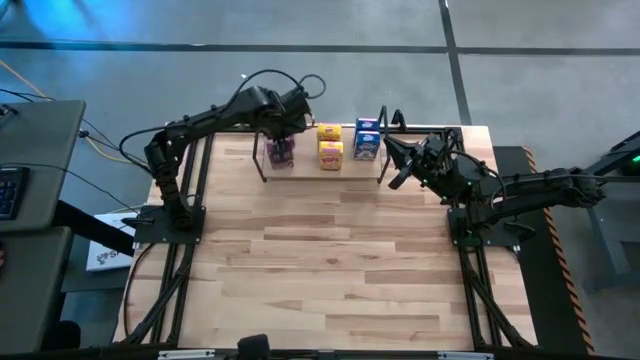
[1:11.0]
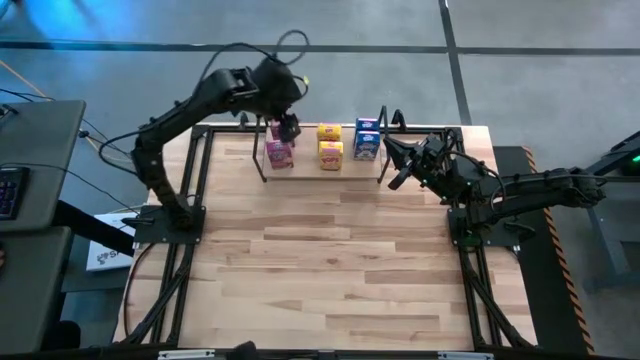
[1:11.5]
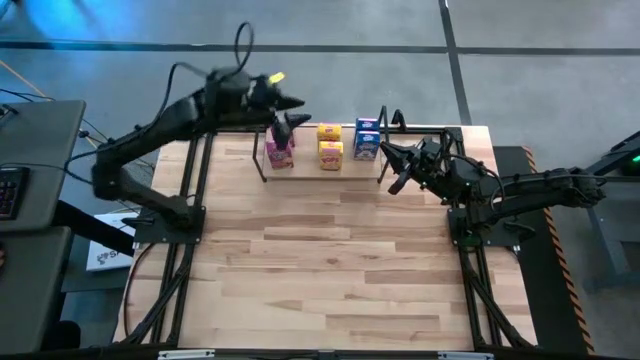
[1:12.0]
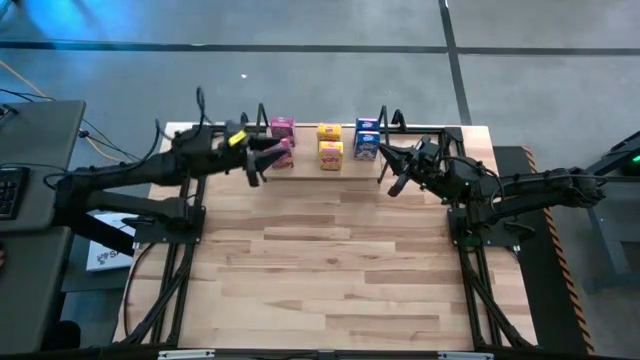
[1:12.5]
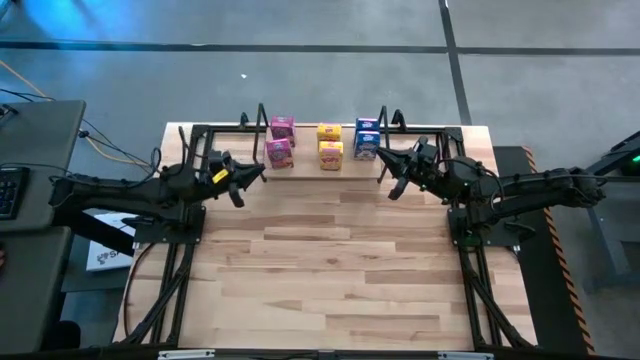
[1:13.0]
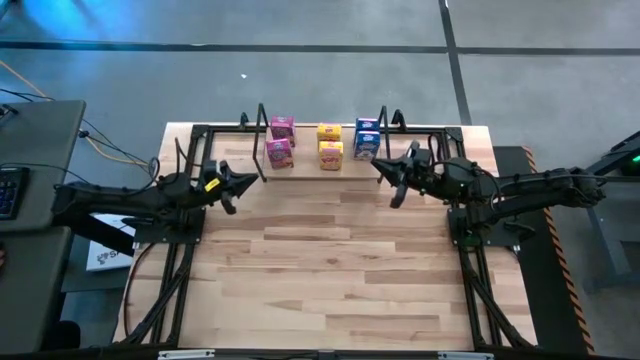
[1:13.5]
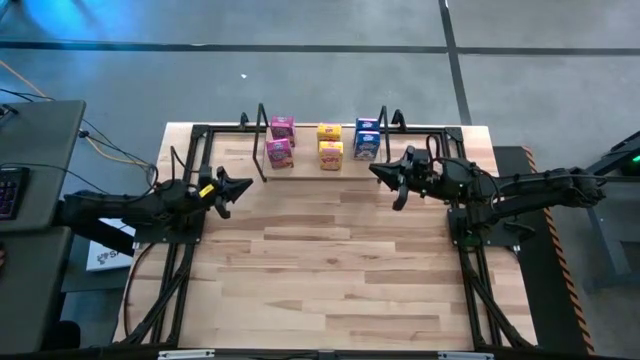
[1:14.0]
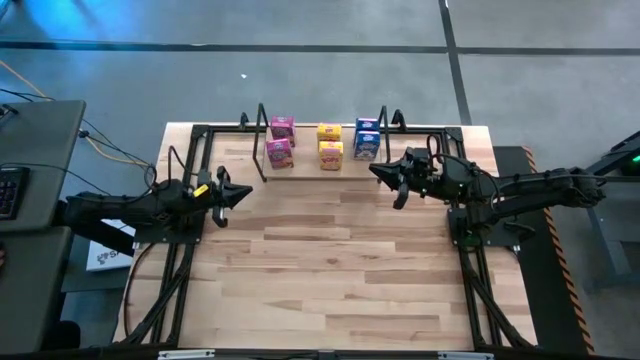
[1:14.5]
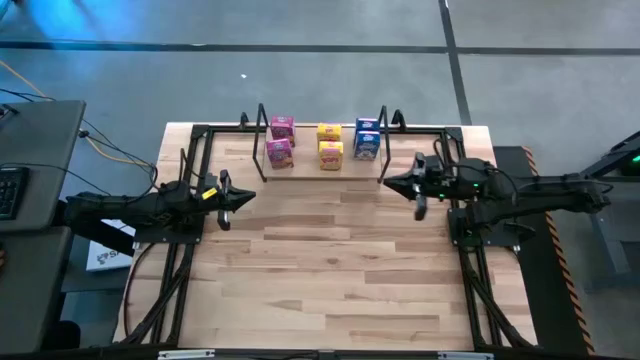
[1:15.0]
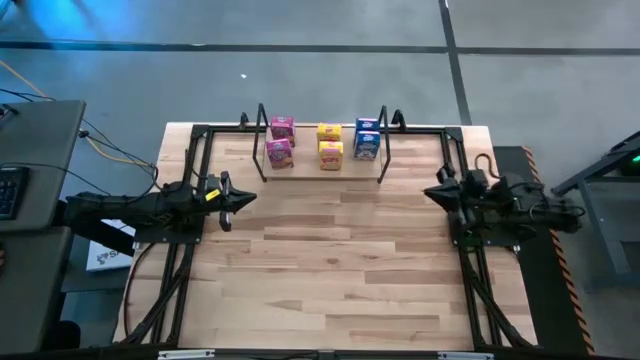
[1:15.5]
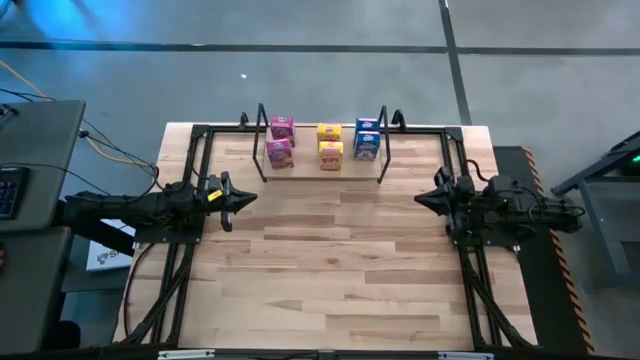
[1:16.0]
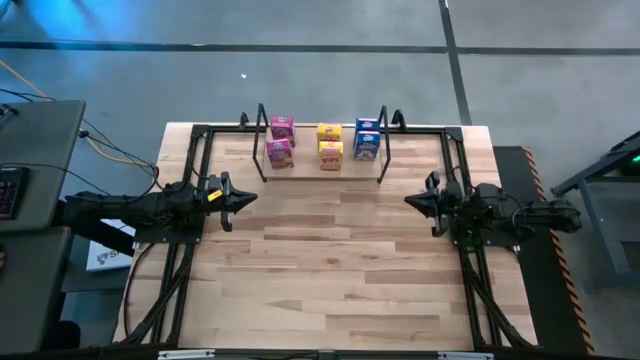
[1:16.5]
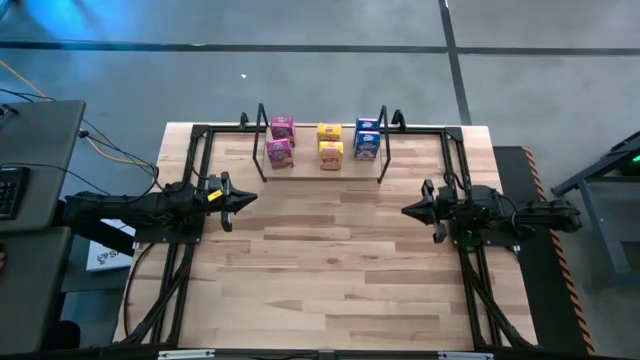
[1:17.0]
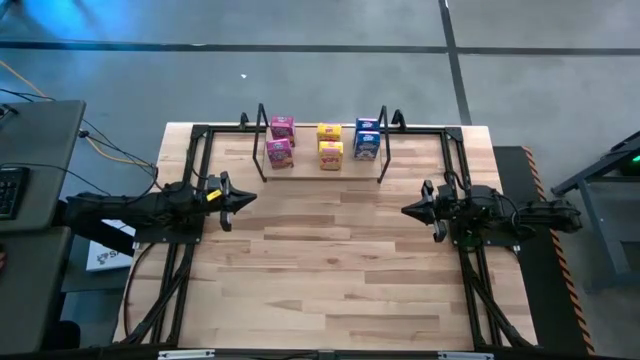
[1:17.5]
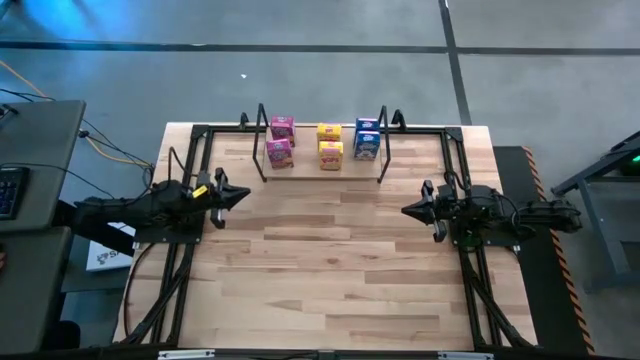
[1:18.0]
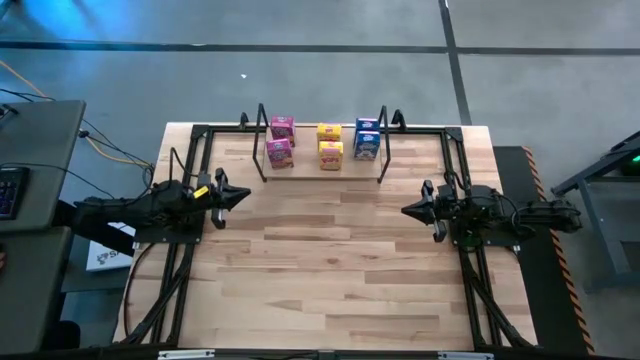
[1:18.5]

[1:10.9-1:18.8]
Task: Stack cereal on shelf
Return to Home Position

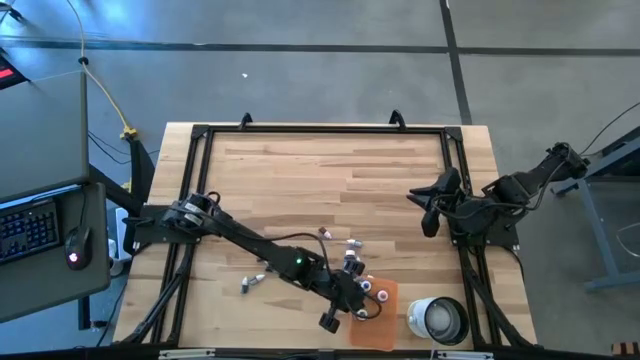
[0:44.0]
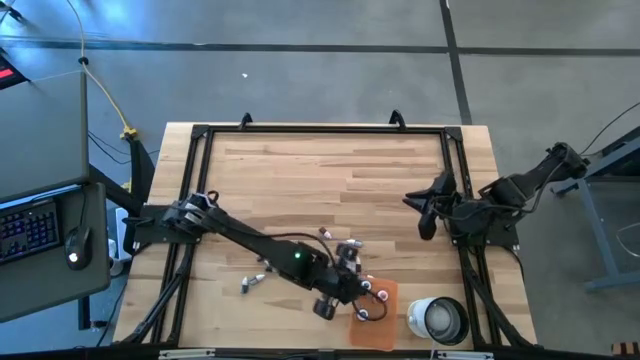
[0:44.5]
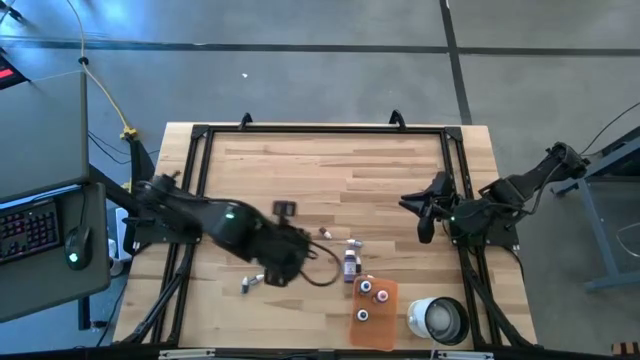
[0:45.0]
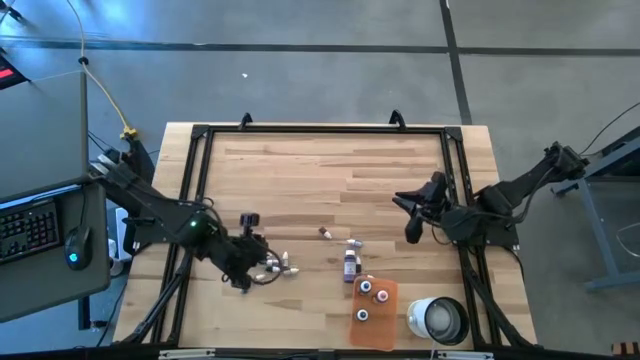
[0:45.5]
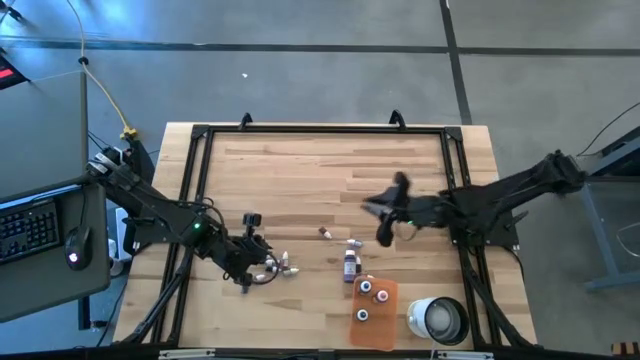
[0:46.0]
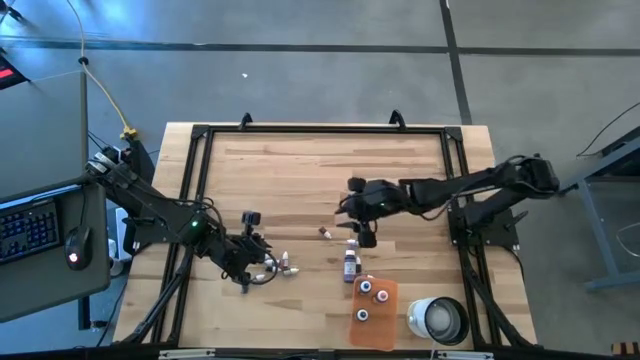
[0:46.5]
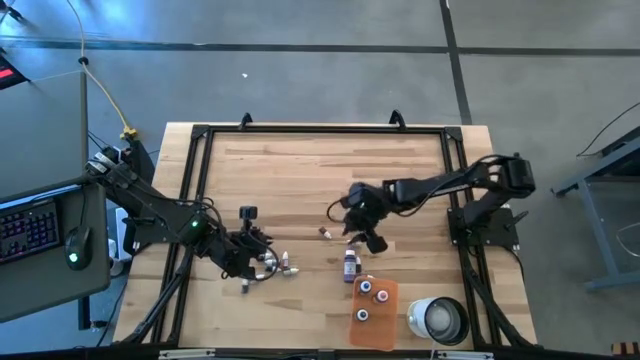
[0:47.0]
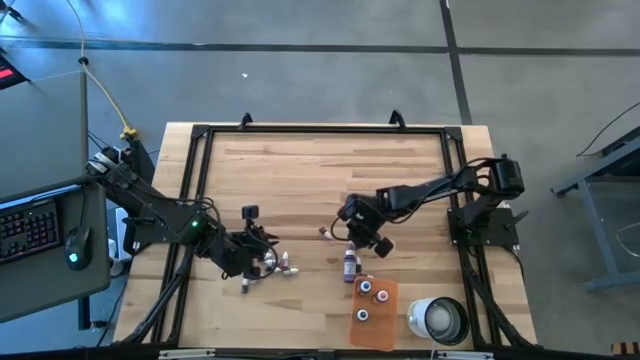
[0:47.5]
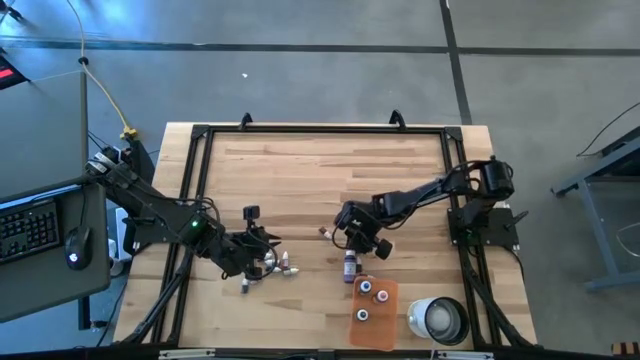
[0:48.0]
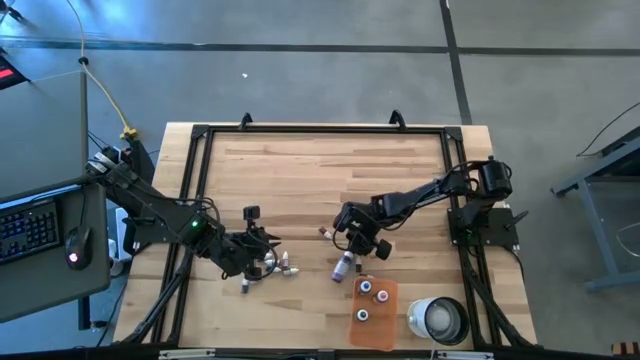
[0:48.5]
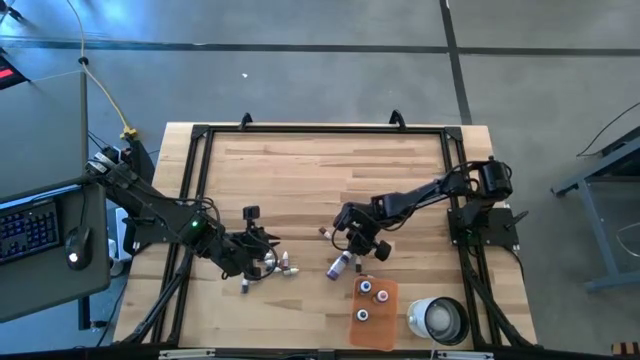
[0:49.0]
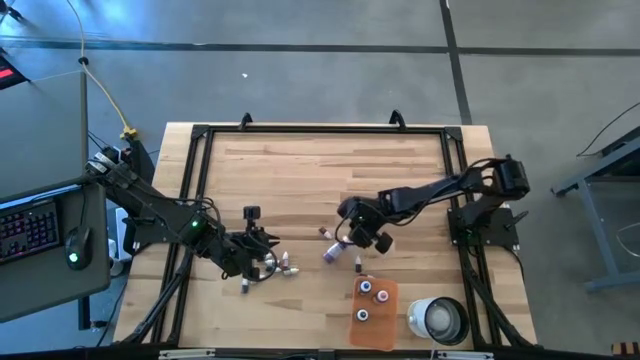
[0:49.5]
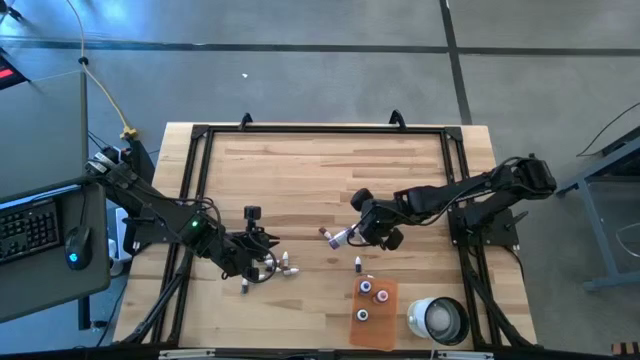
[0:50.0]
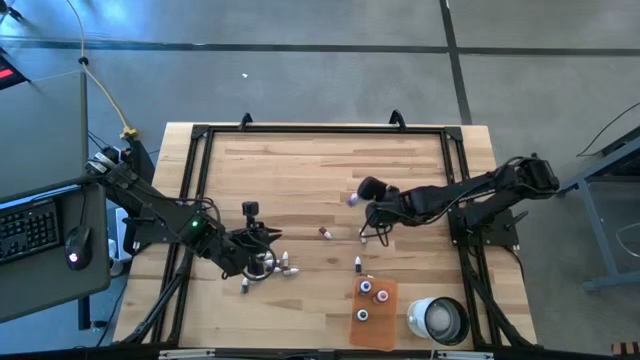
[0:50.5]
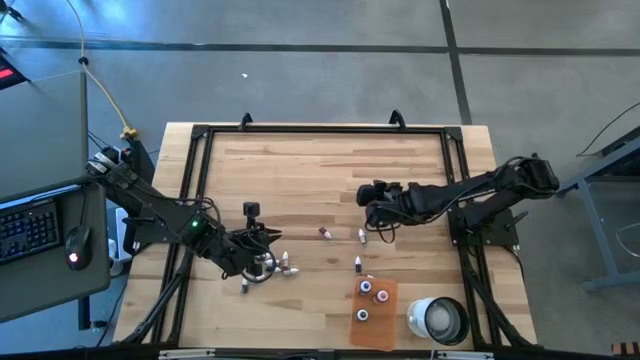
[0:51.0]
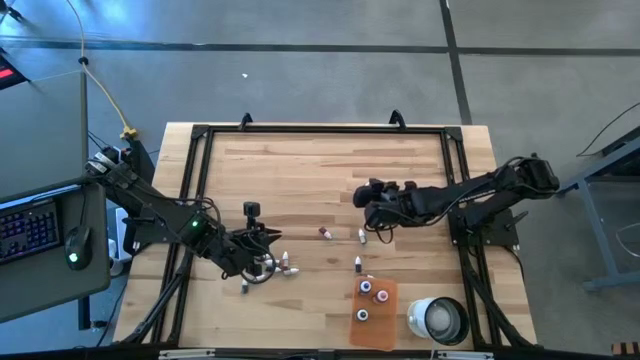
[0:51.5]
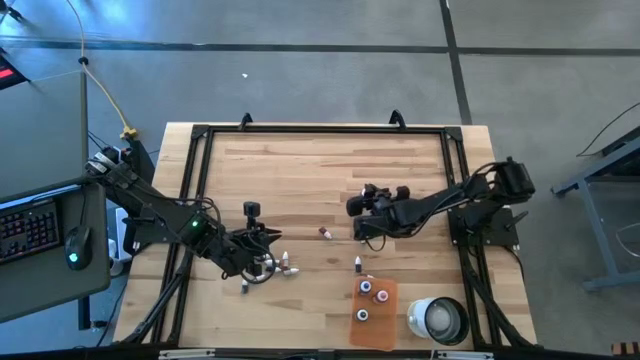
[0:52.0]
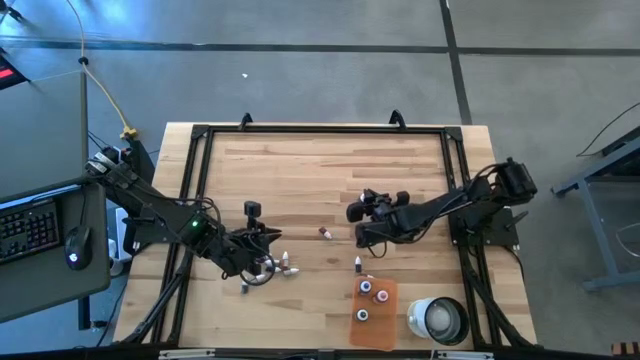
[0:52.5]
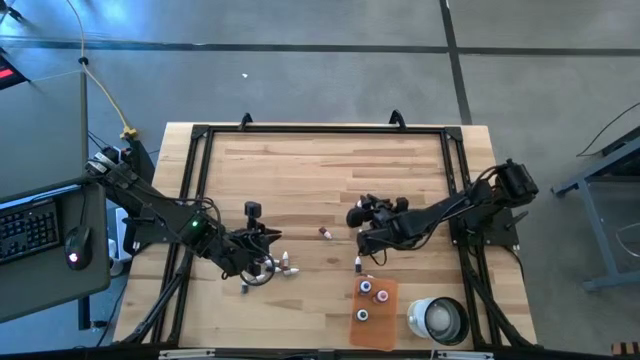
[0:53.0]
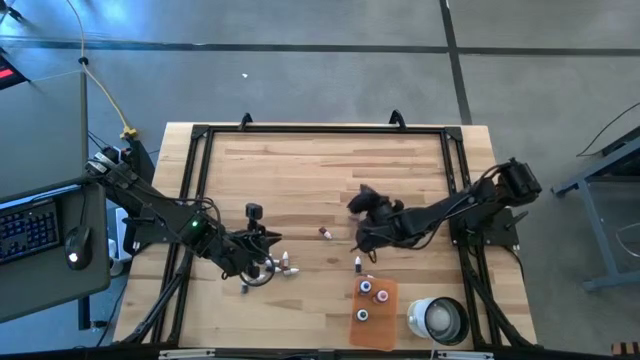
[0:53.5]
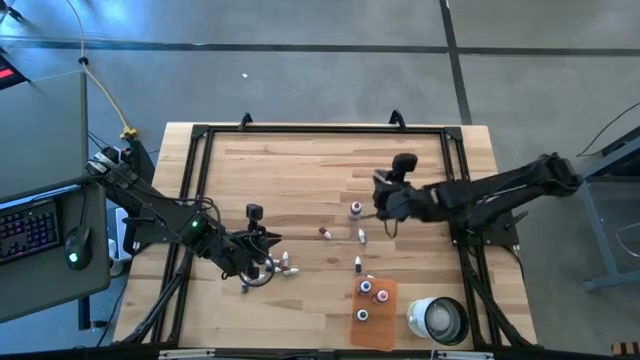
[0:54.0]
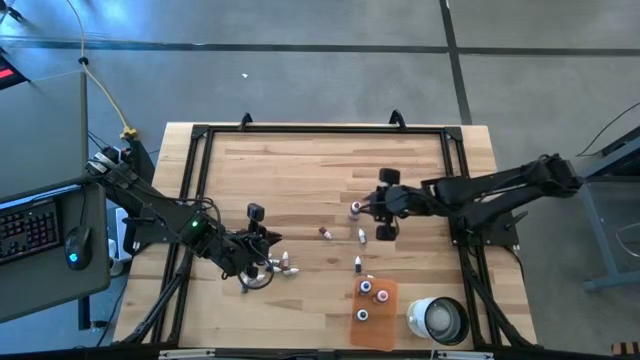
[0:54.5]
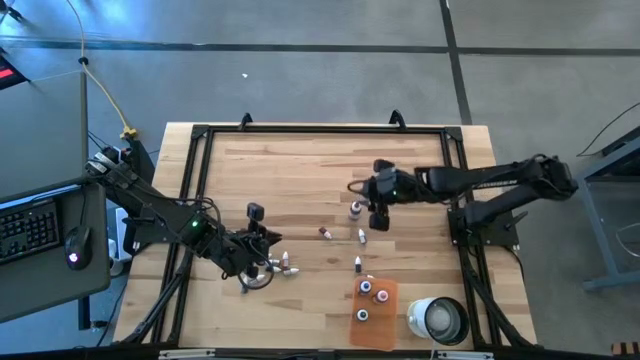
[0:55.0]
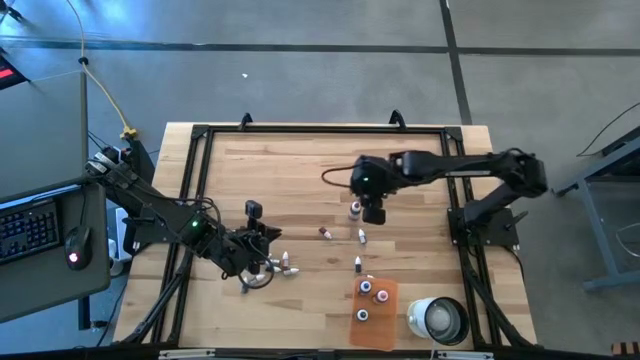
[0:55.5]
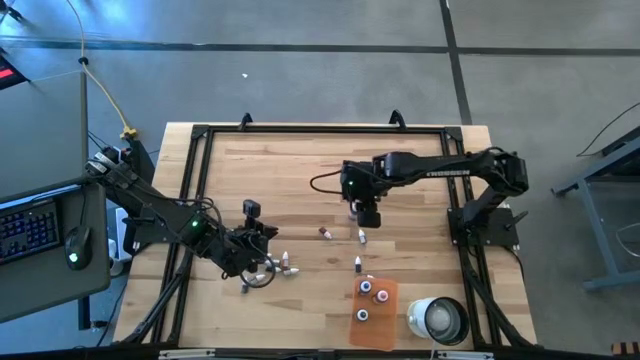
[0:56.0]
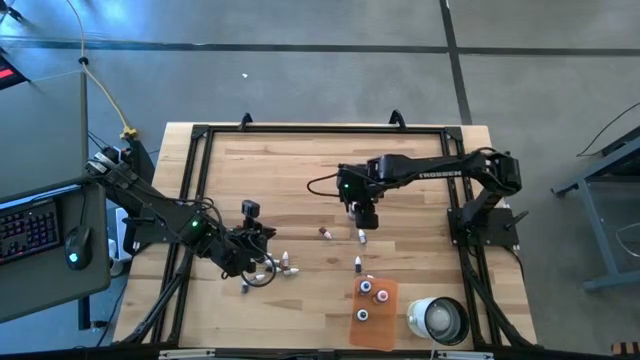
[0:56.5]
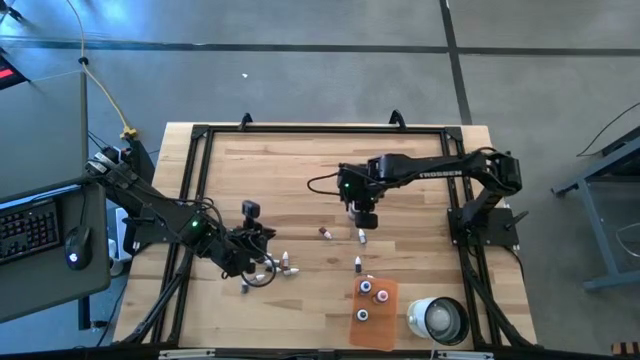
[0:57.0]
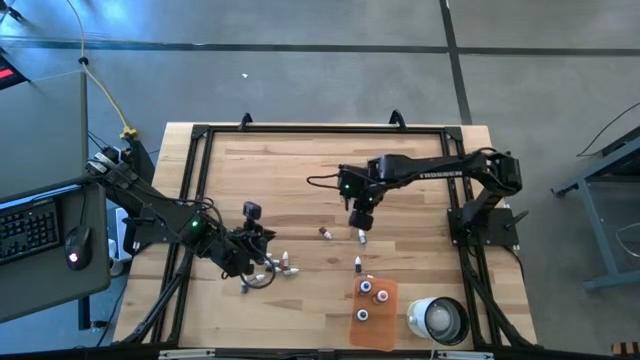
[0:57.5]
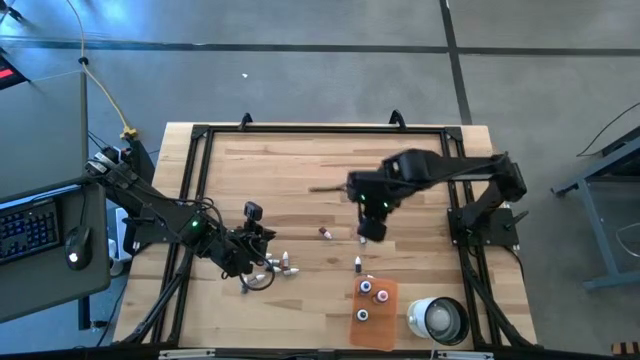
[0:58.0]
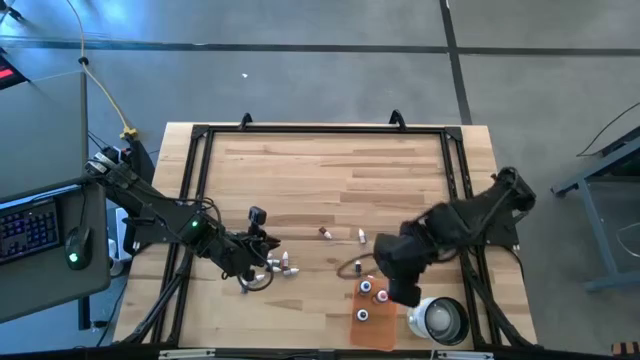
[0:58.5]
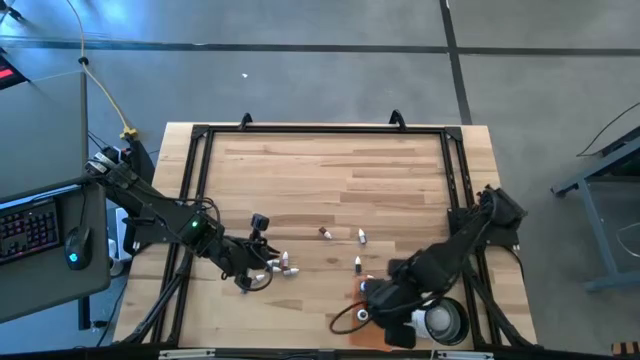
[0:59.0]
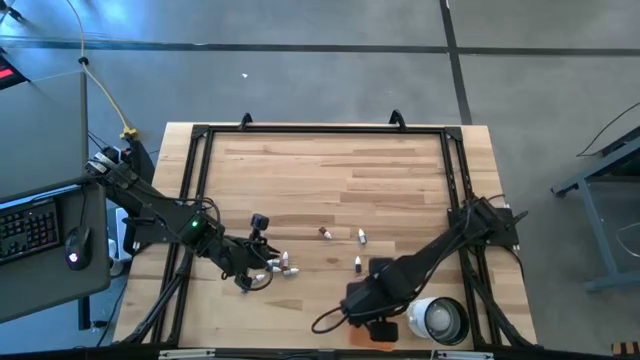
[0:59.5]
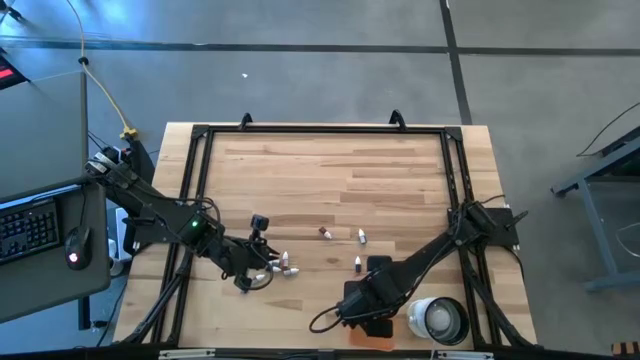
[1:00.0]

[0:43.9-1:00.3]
Task: Pick & Place food coloring
Put the large purple food coloring bottle into the orange bin
